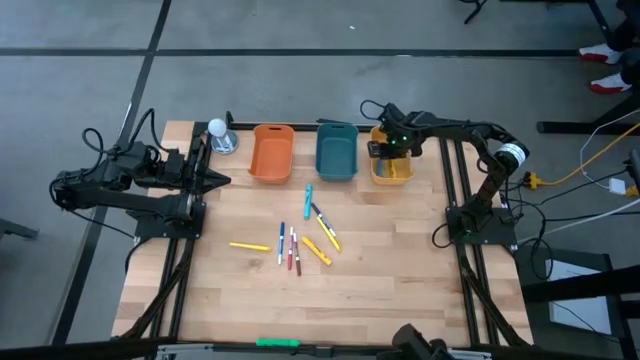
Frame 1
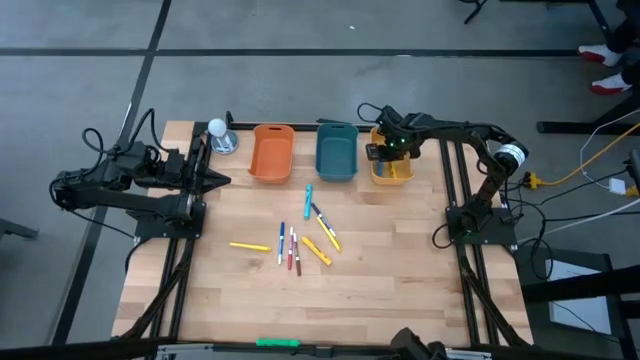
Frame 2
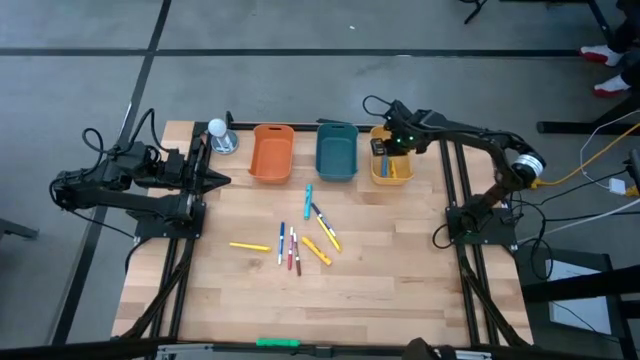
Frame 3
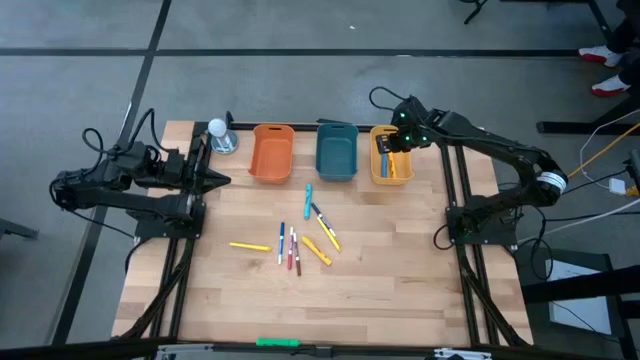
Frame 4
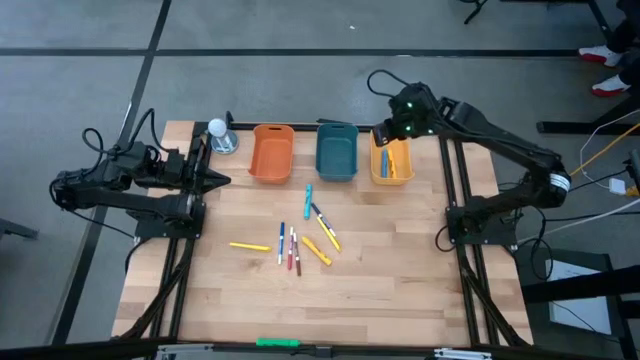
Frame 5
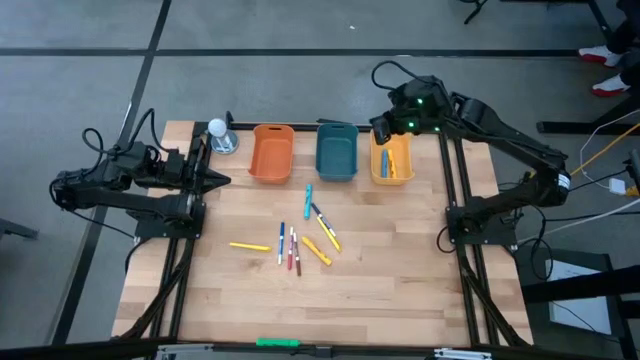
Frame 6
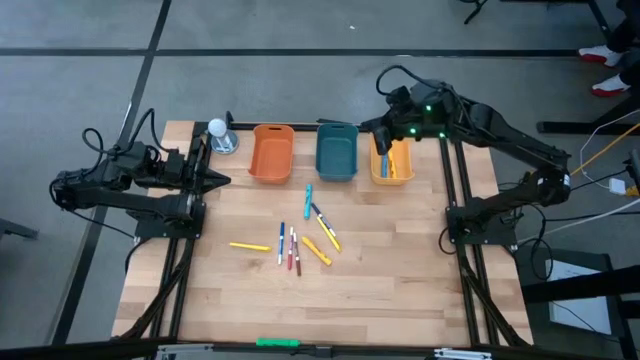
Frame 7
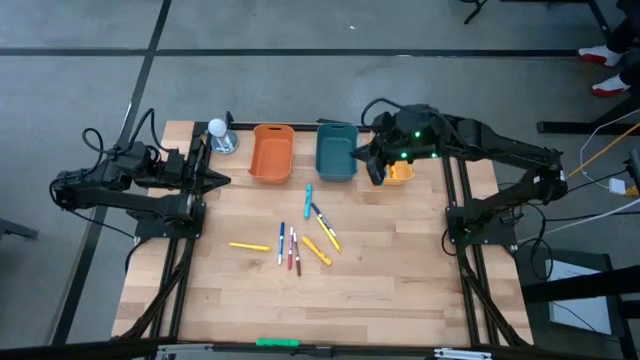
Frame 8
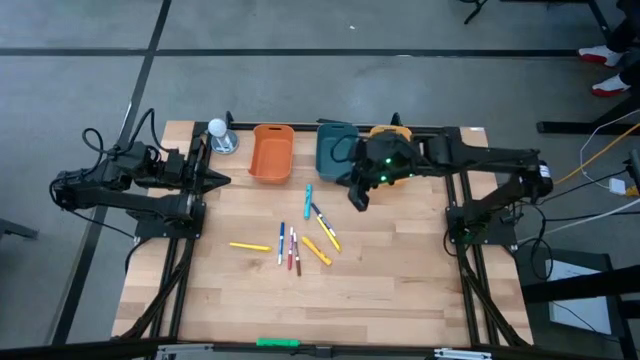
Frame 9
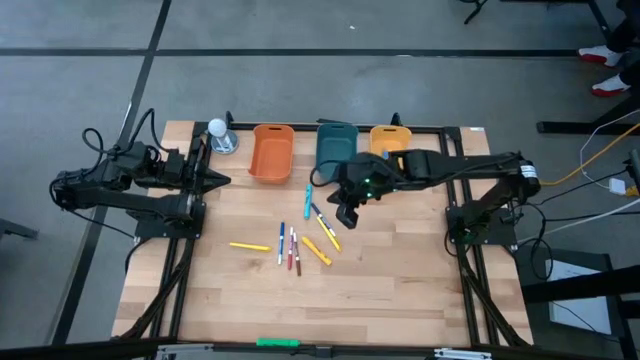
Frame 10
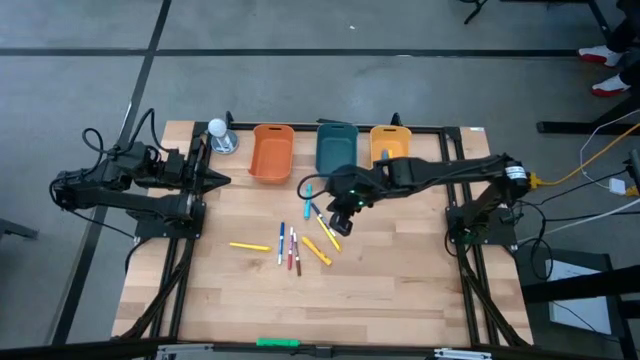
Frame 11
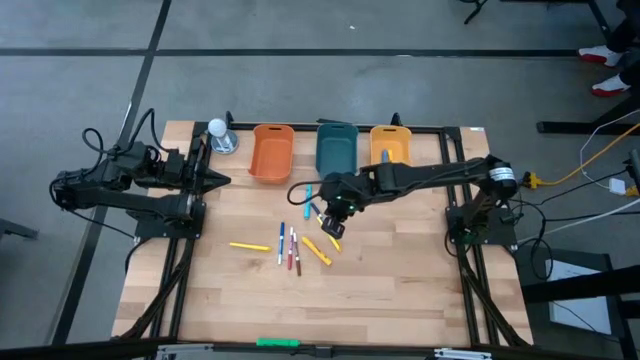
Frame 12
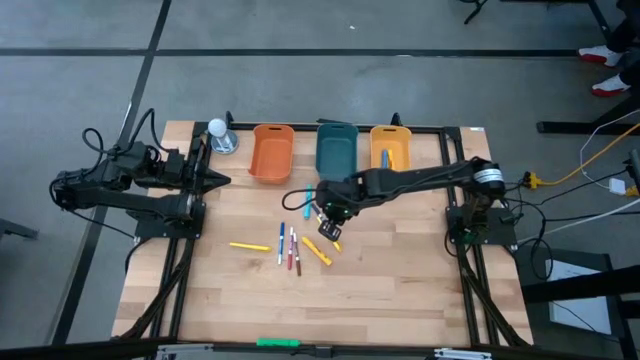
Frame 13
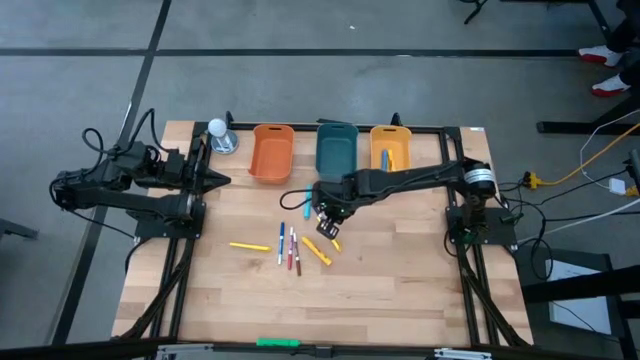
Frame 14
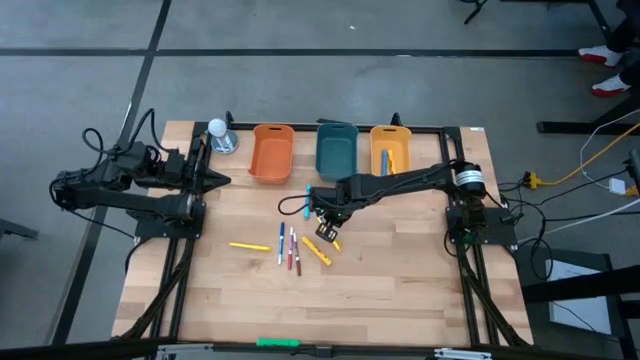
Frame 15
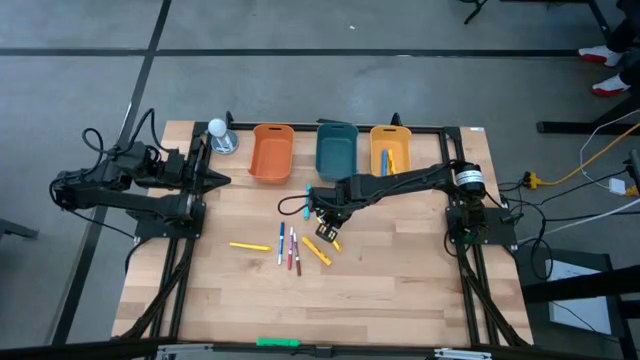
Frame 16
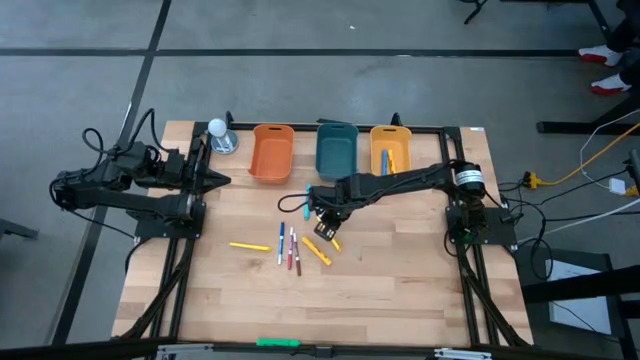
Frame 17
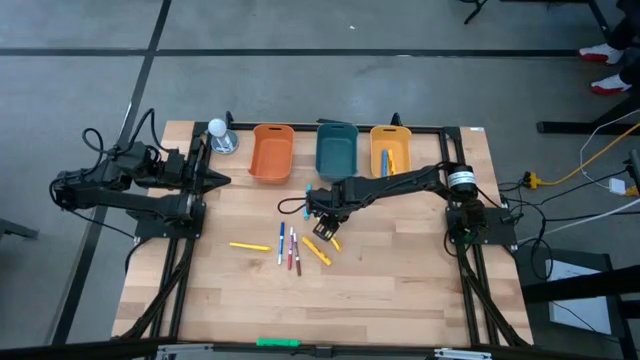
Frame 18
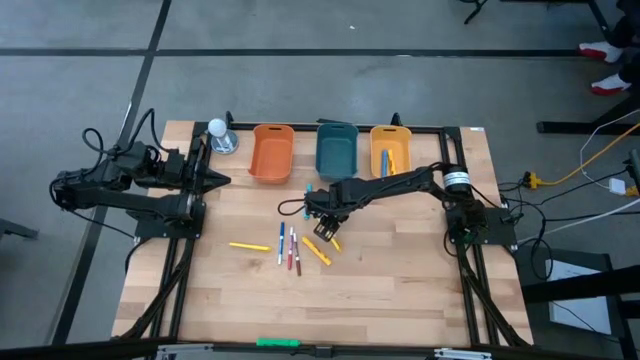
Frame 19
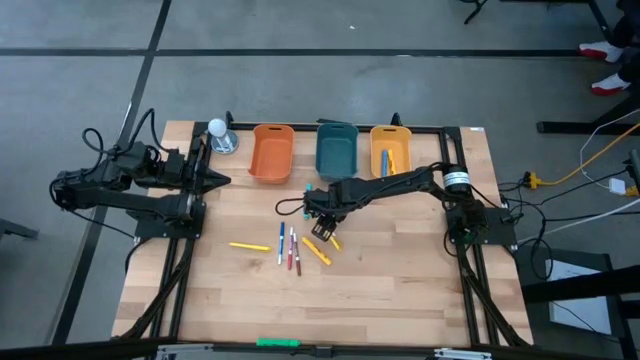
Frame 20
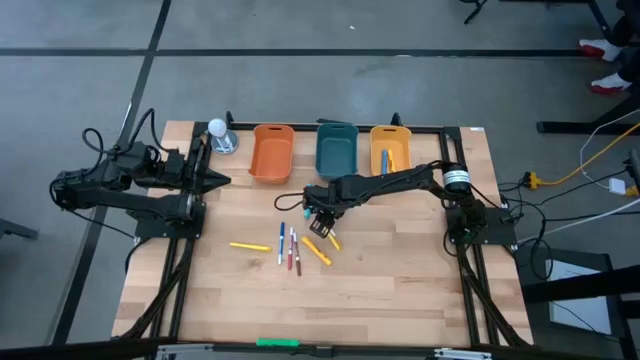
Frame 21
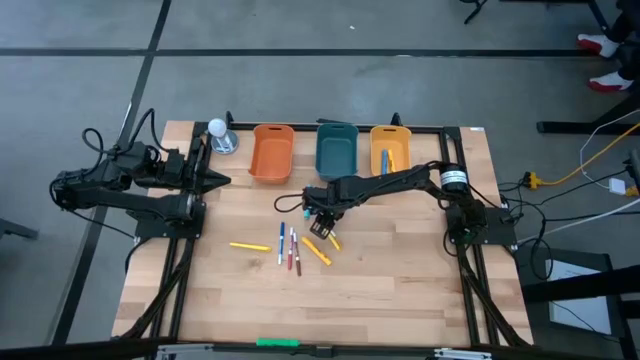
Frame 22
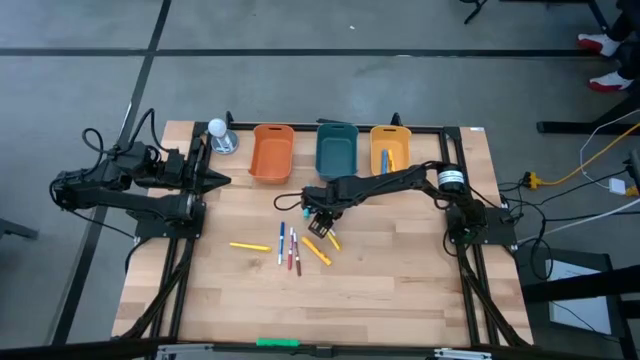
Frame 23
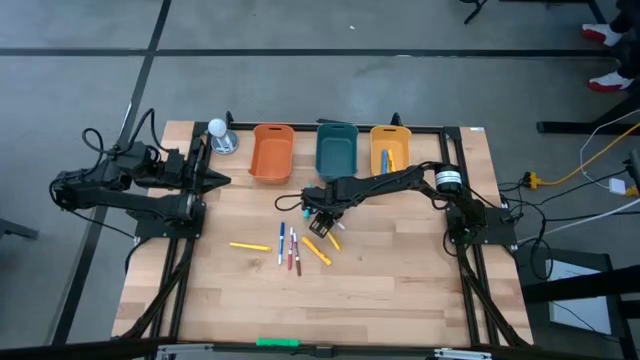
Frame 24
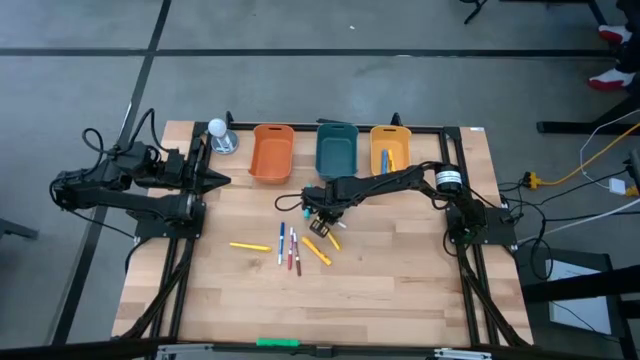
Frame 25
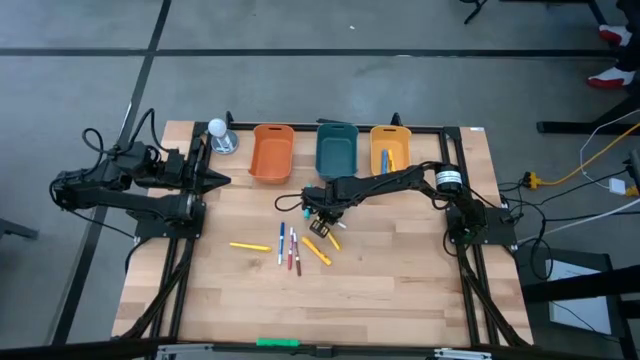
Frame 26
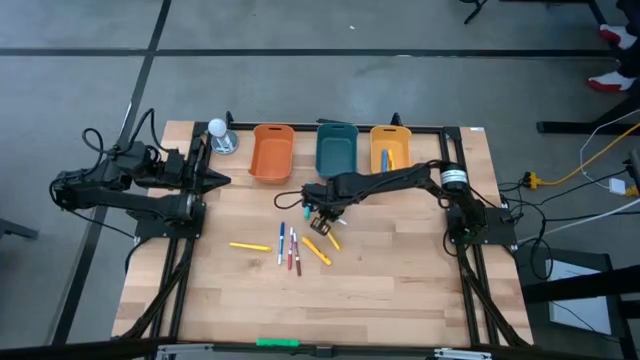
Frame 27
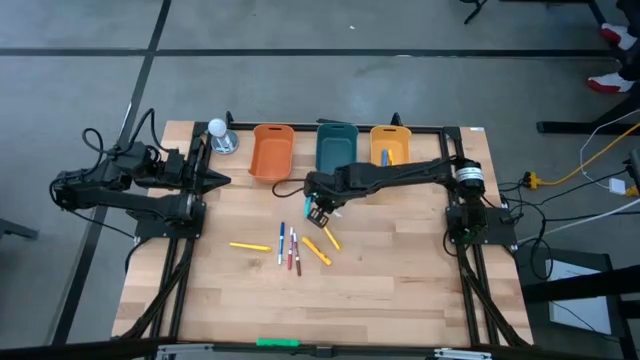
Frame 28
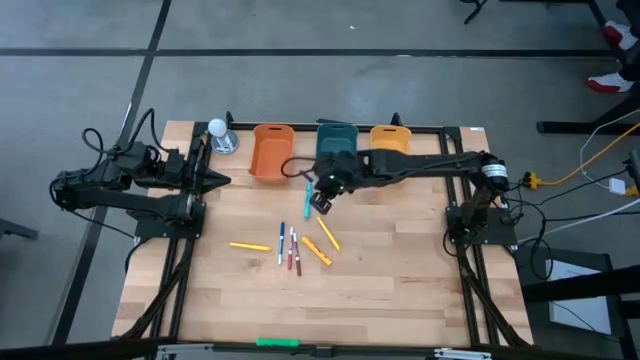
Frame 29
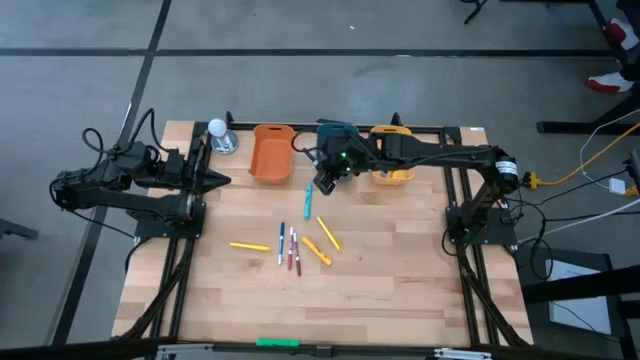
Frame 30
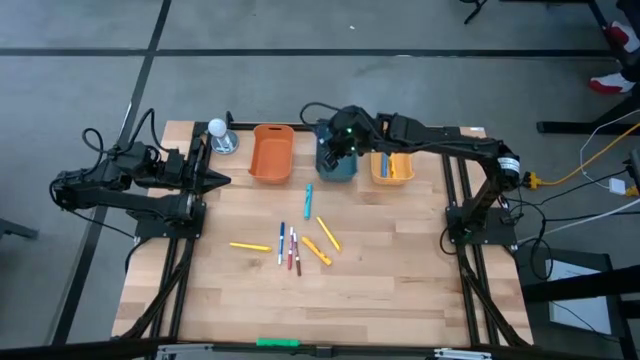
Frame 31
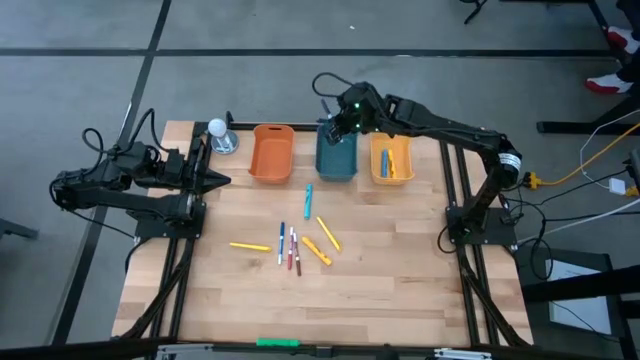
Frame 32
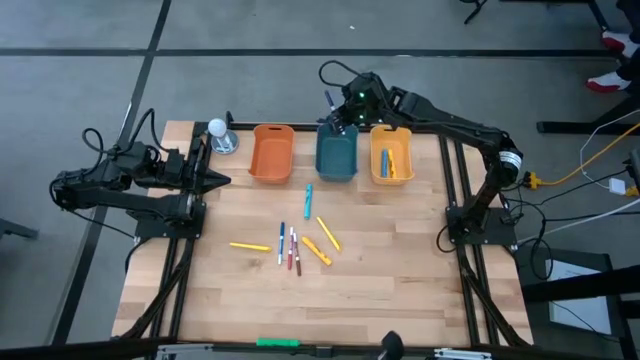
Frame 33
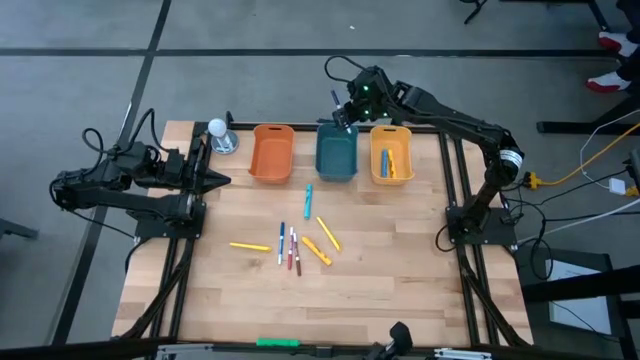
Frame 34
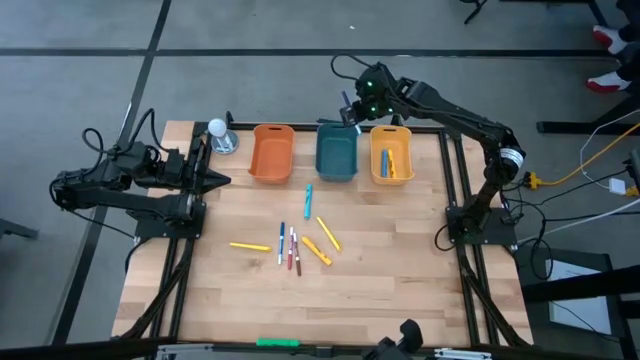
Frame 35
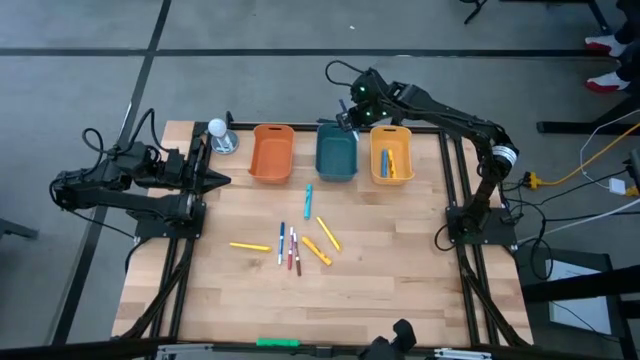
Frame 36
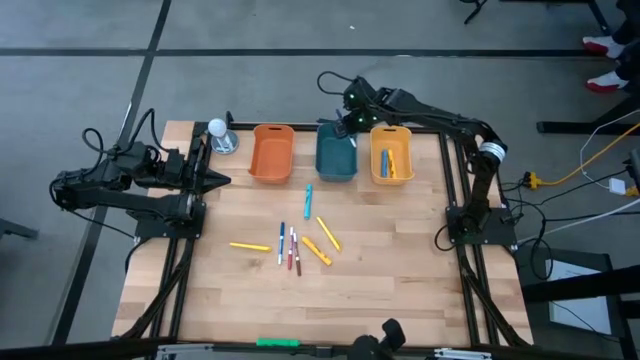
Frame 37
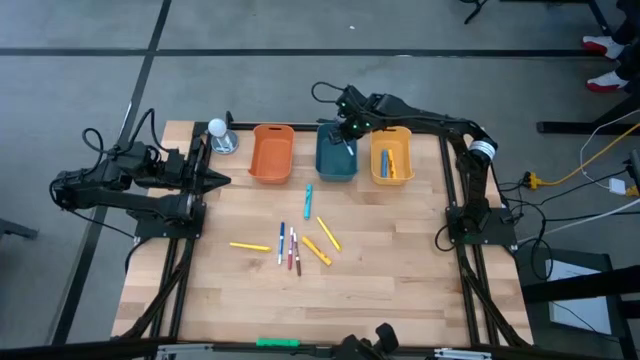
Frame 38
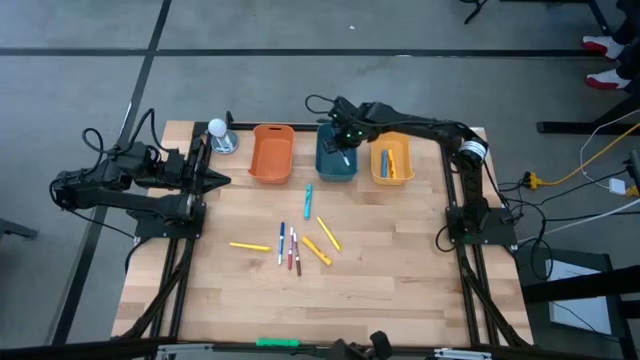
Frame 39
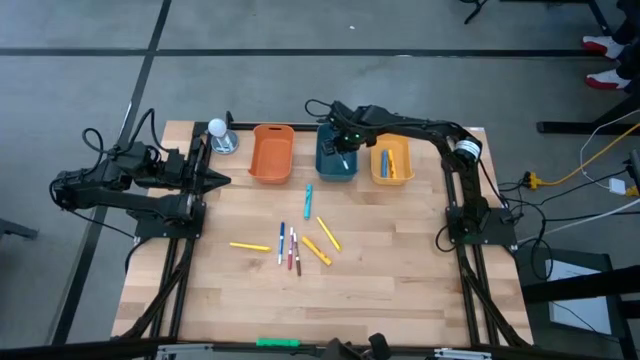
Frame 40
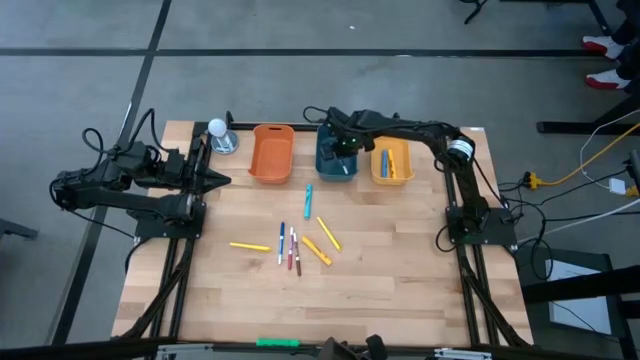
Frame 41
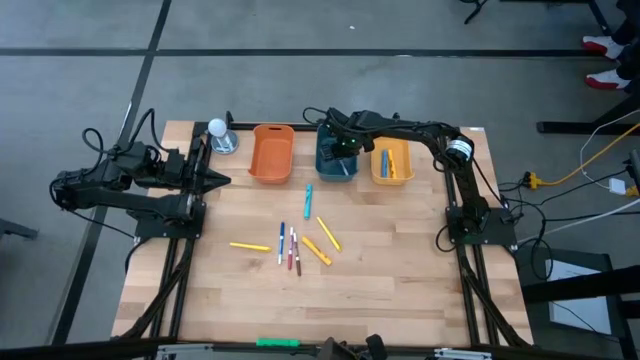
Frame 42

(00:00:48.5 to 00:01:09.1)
Task: Pick & Place Markers
Put the right blue marker pen into the blue bin

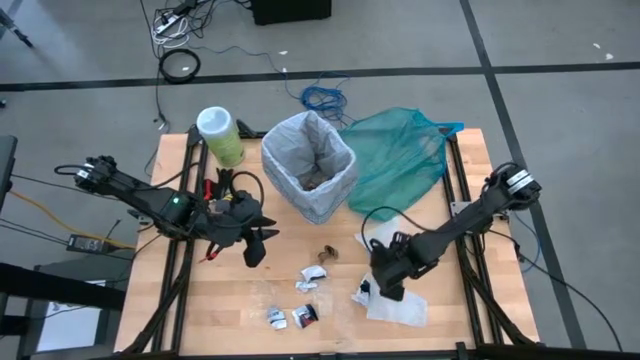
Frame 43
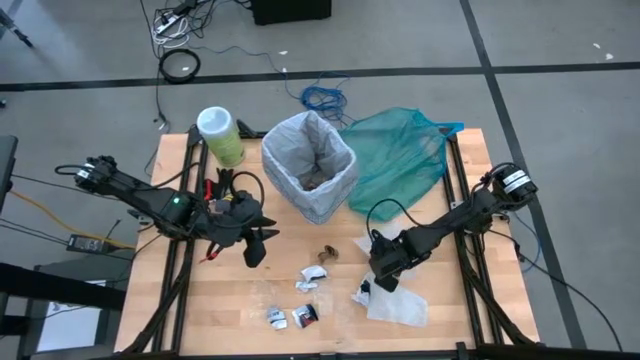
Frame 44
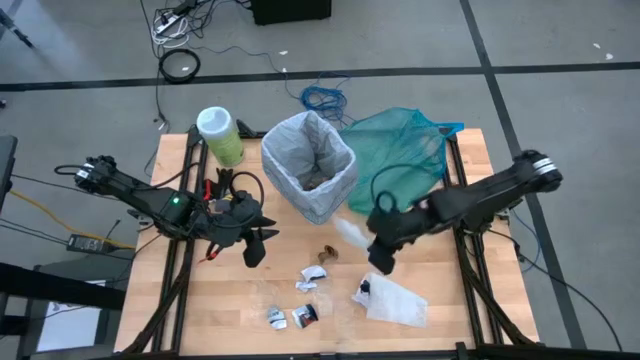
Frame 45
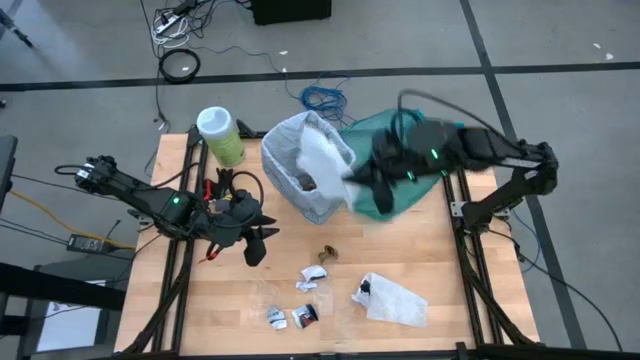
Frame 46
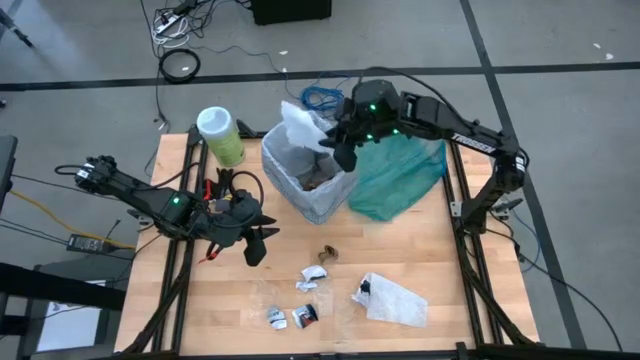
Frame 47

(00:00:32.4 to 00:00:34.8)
Task: place trash/remove bag and relplace
Put the white tissue paper into the trash bin
